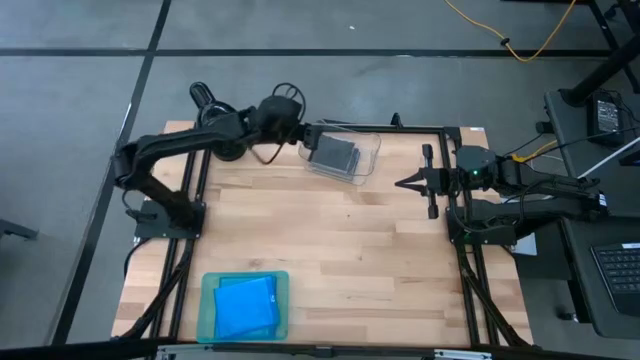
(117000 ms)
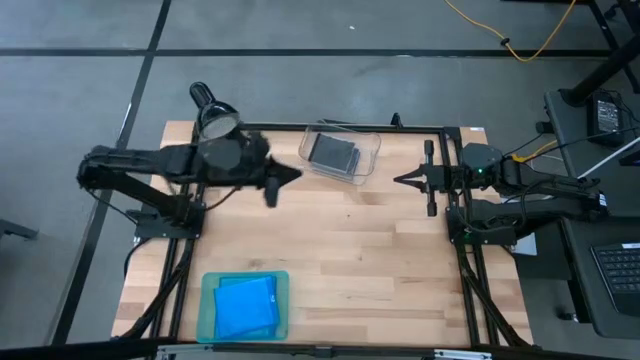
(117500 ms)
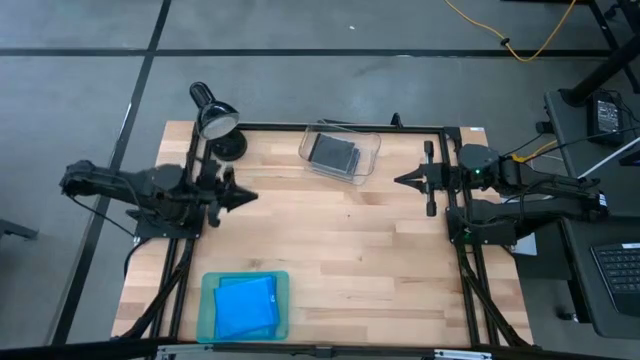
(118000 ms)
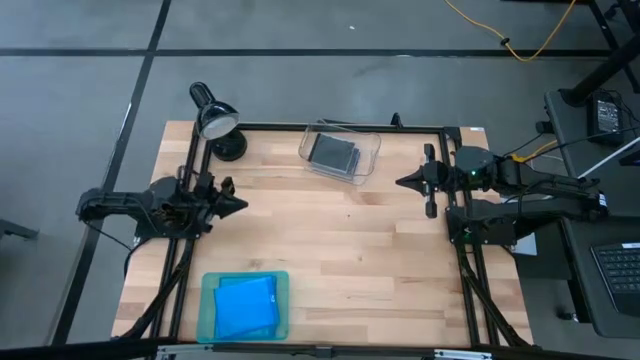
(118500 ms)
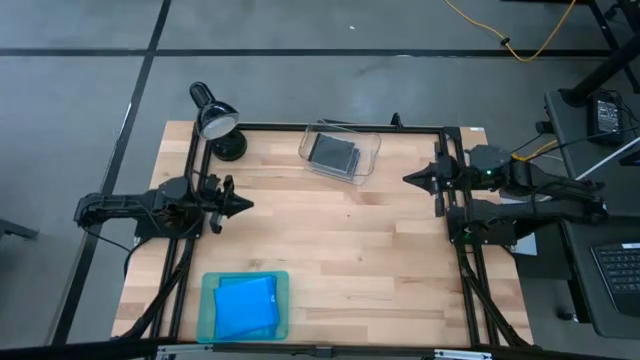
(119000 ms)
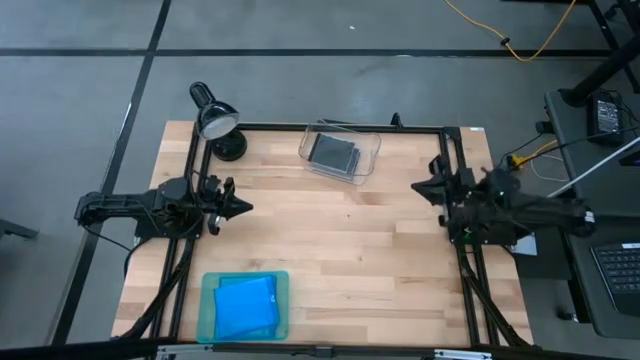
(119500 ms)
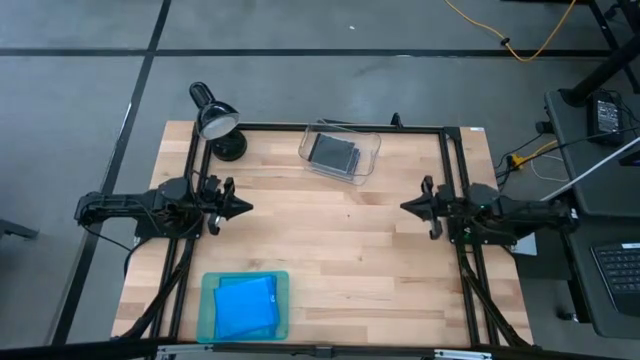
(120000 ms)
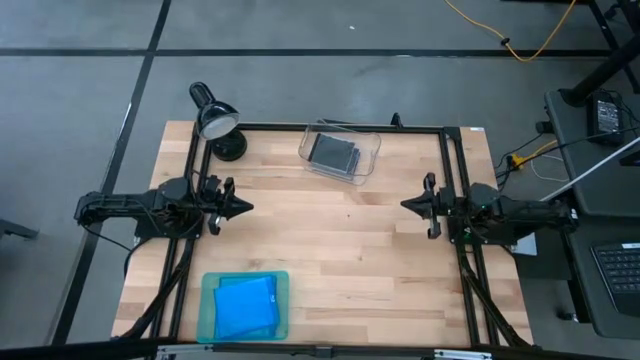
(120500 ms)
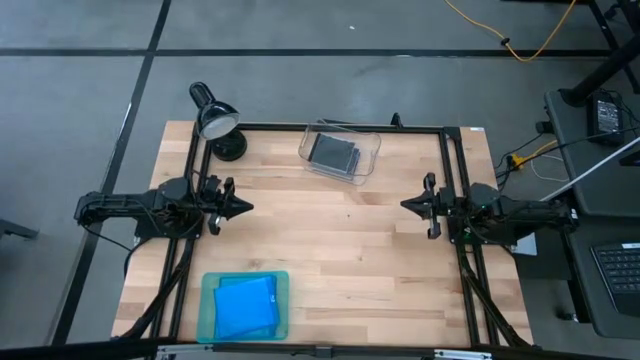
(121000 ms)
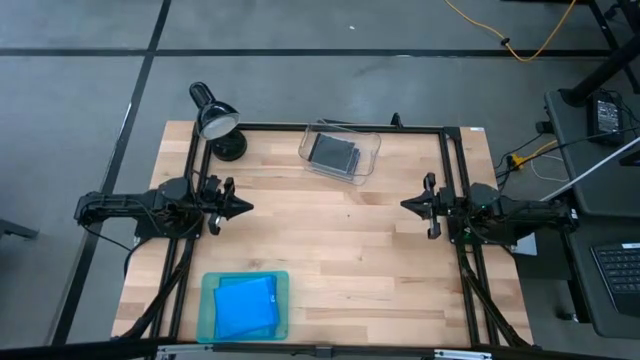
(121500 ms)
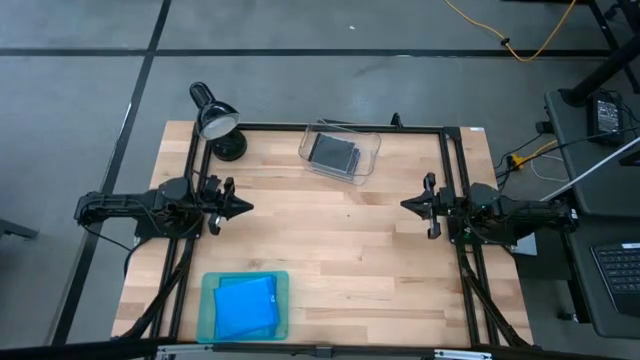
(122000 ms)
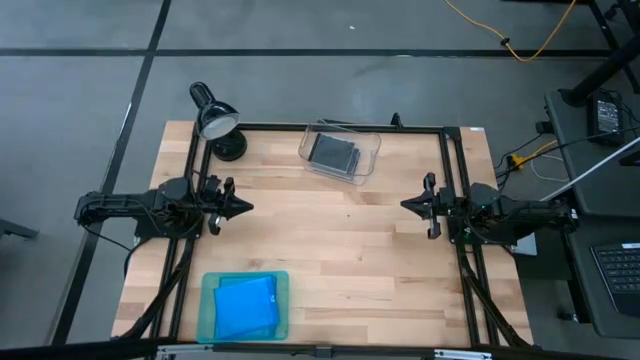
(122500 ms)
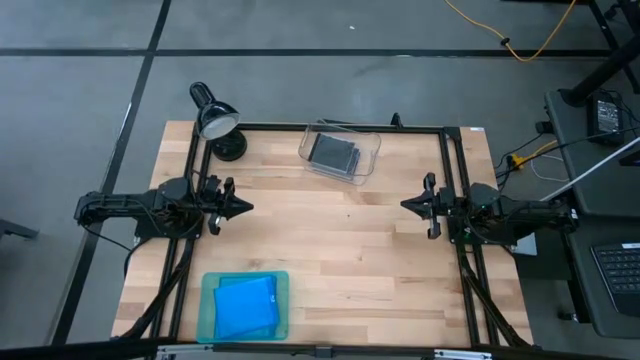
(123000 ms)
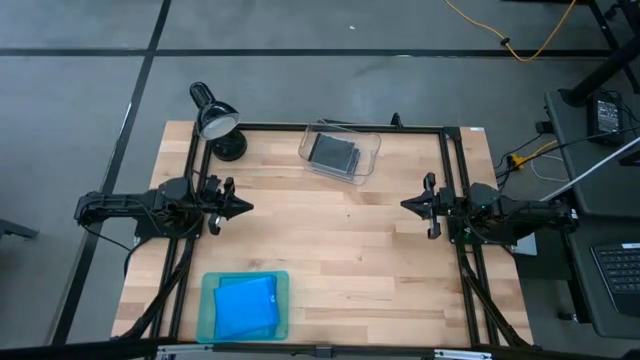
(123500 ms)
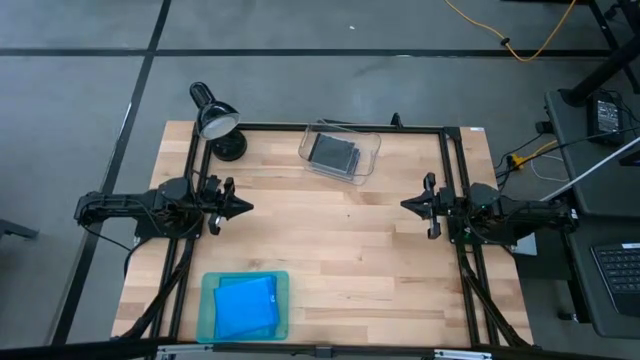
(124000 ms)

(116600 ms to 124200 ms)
Task: Pick & place jewel cases by type
Return to Home Position

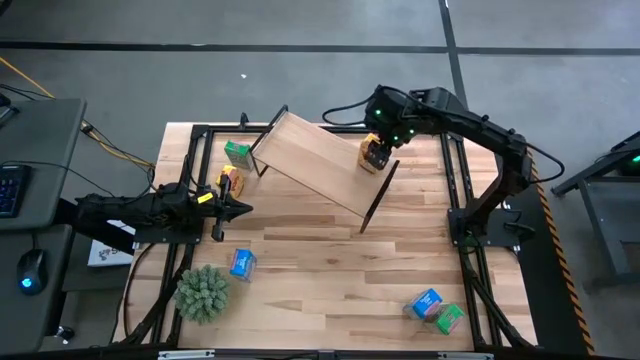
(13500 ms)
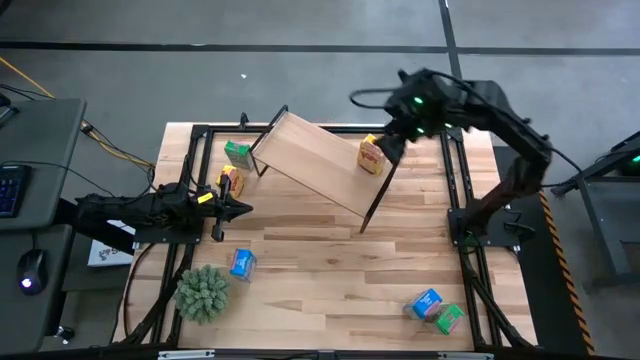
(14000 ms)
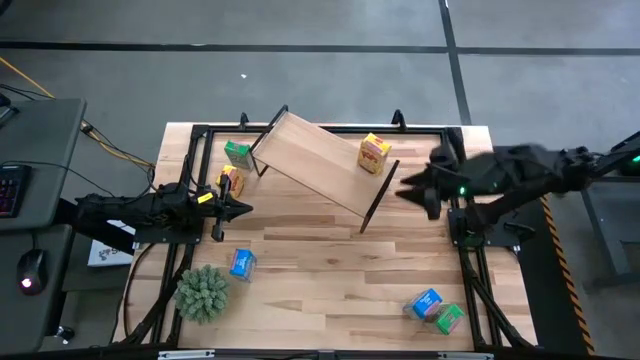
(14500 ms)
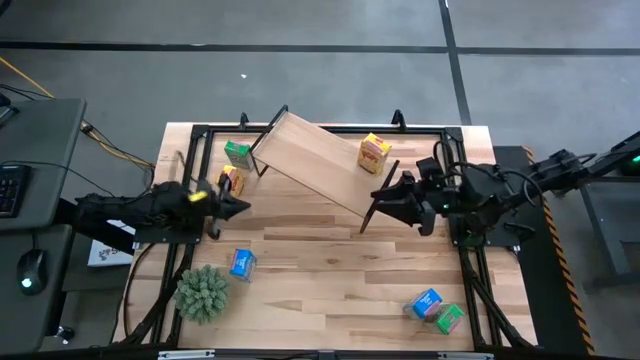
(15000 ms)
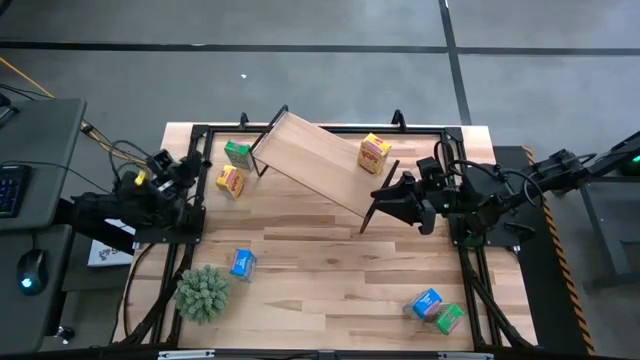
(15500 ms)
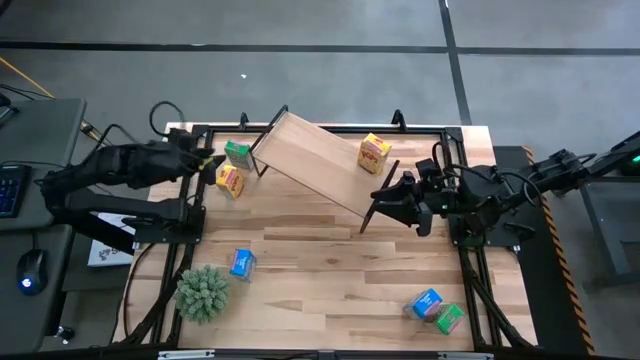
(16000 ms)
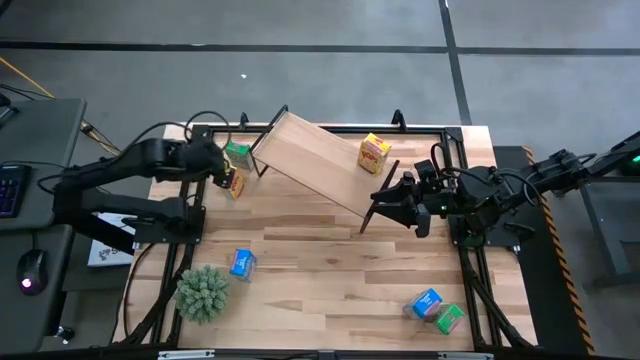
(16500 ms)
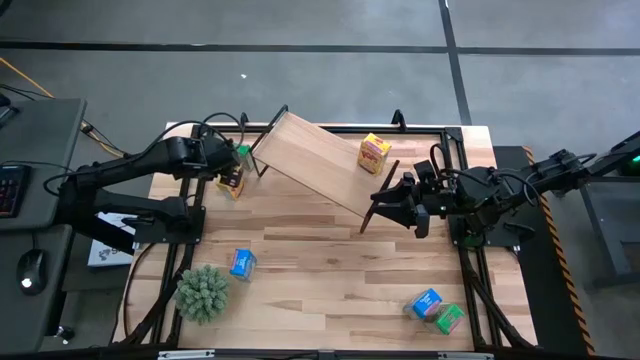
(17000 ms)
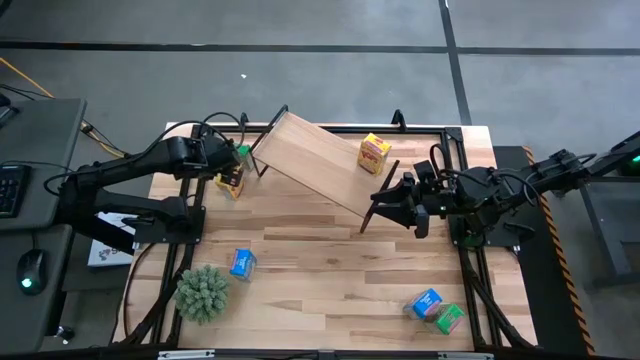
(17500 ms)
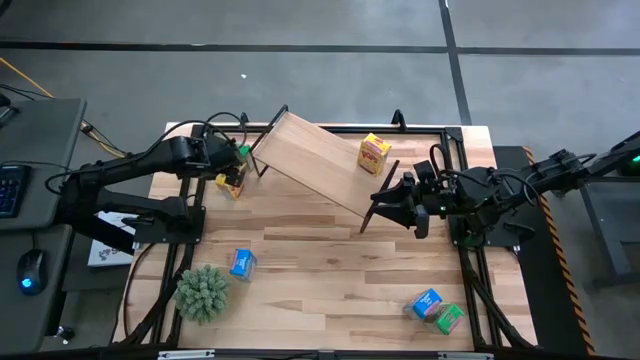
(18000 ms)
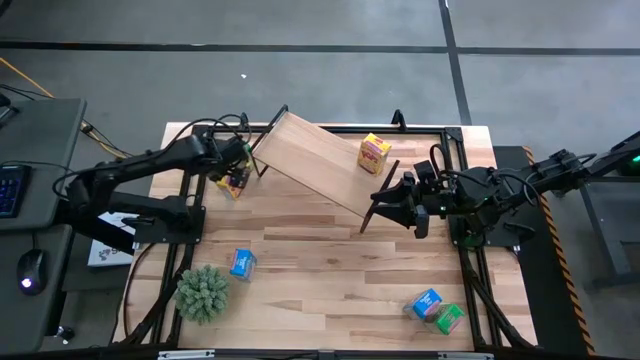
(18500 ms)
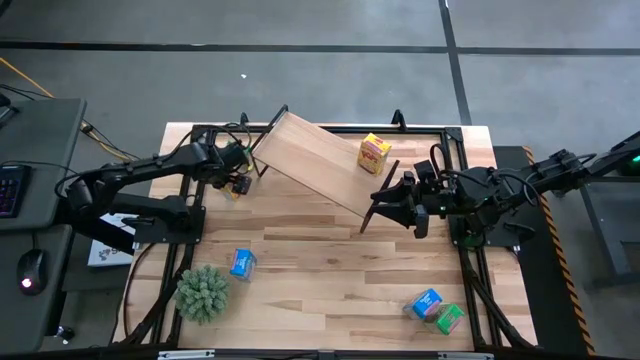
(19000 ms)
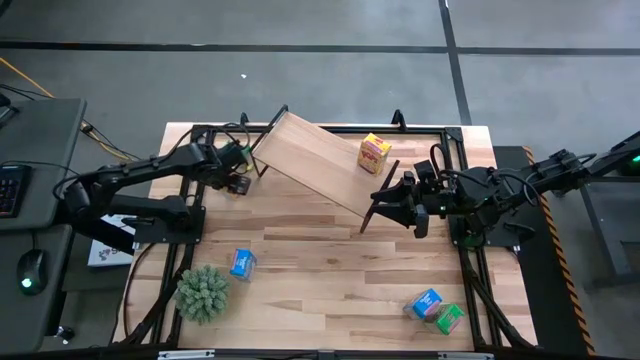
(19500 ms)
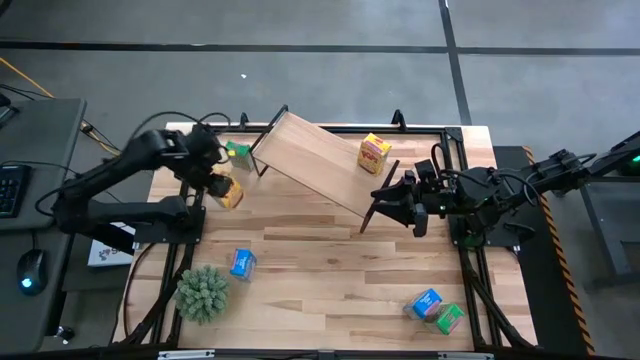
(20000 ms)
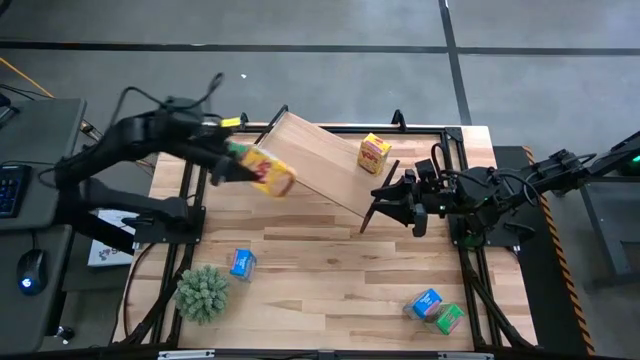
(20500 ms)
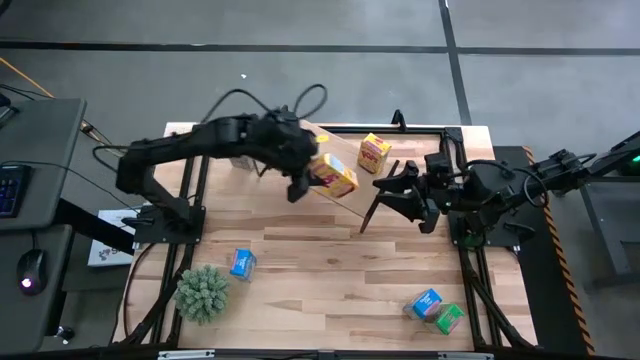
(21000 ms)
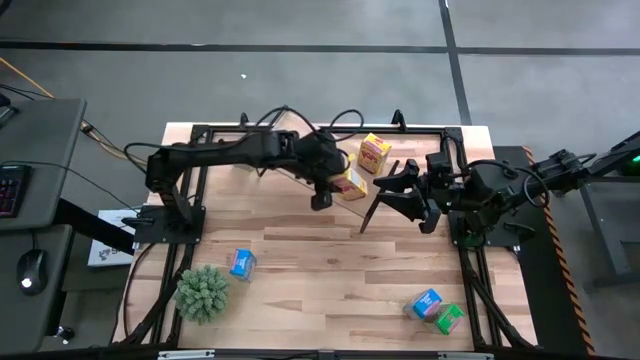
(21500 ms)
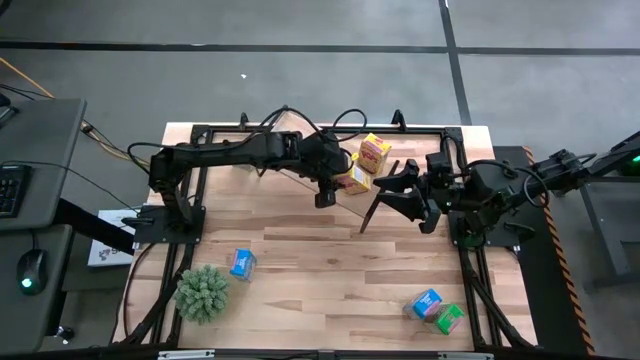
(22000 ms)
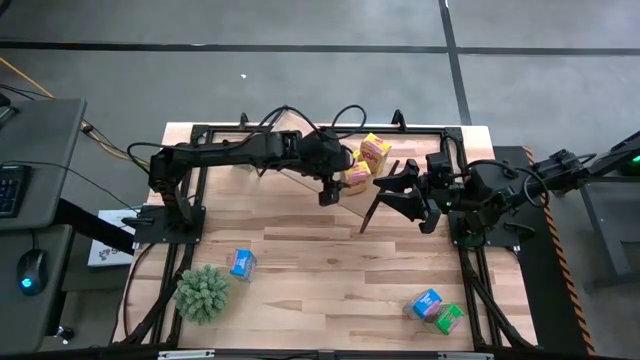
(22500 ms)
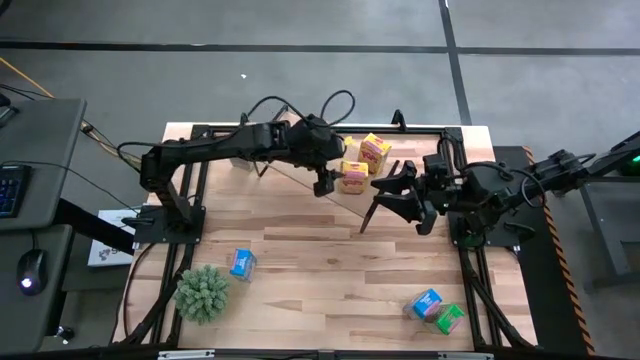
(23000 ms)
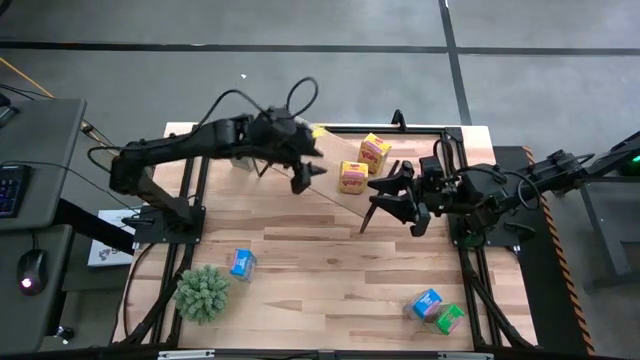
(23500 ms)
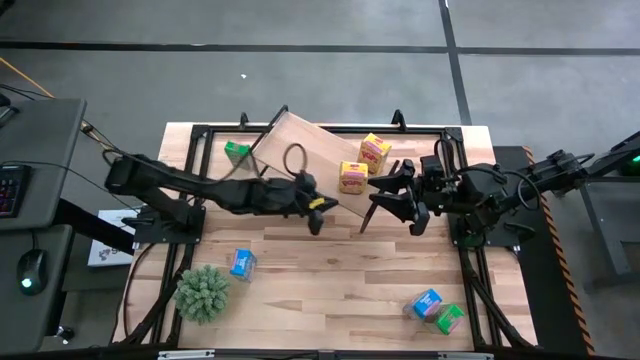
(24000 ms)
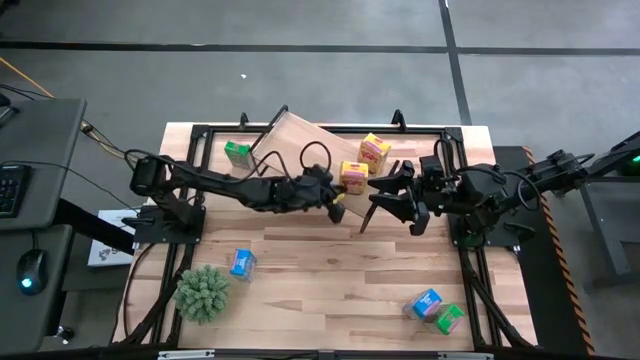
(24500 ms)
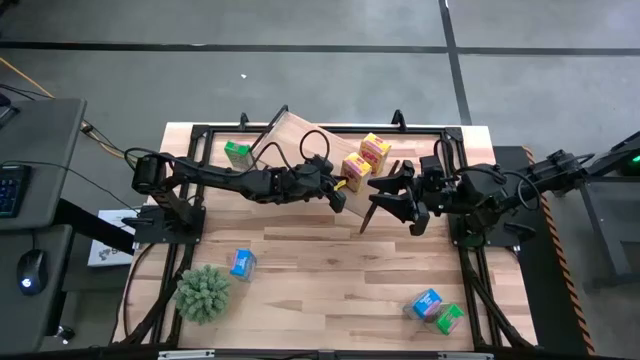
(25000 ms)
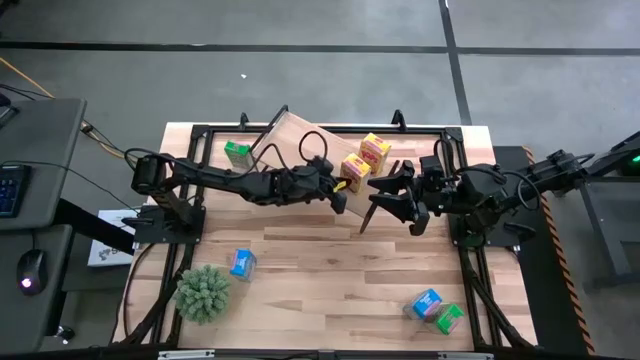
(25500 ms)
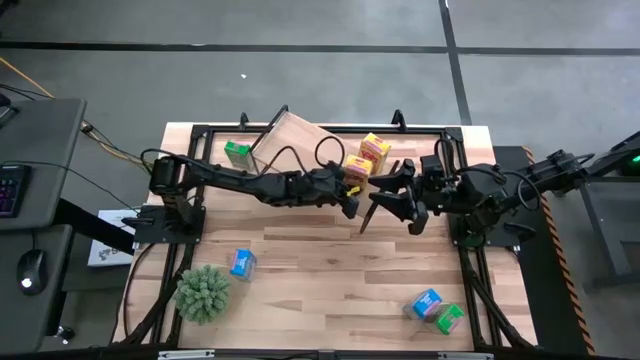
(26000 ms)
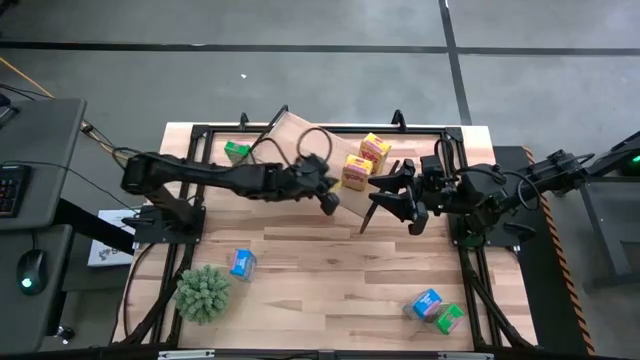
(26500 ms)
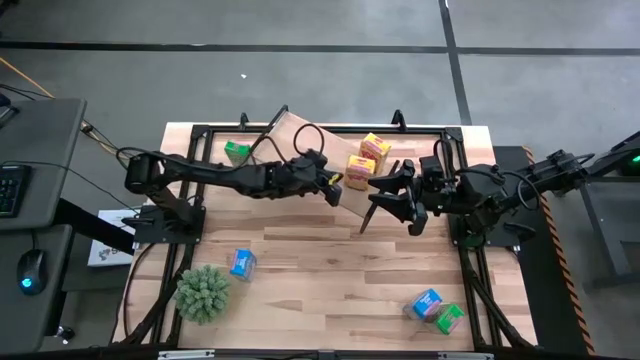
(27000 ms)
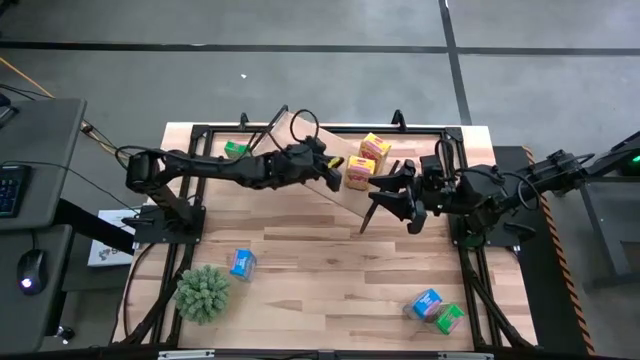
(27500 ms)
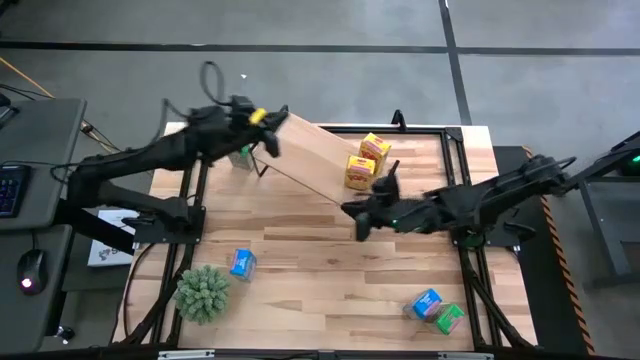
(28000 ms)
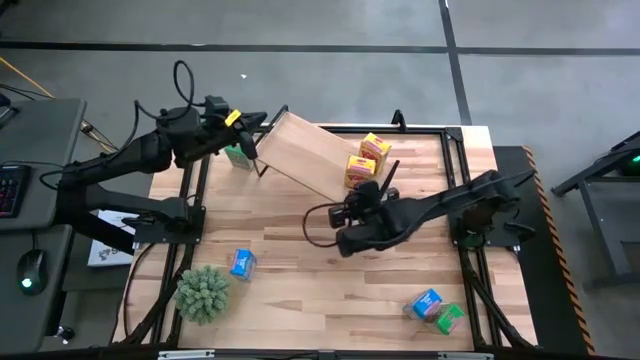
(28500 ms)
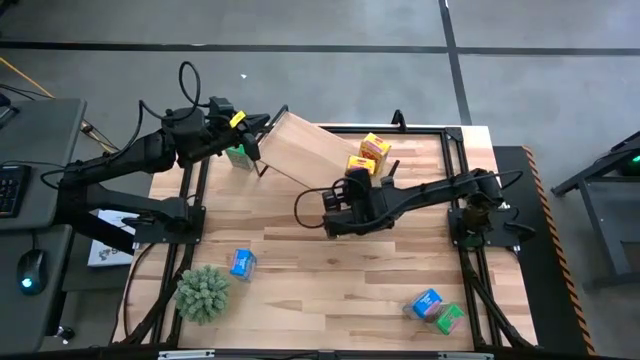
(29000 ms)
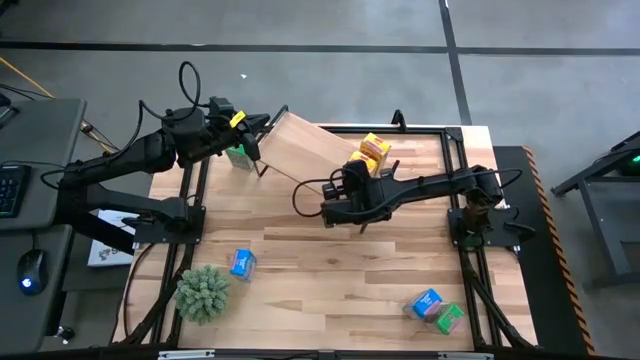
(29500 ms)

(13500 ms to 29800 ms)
Task: Stack cereal on shelf
Put the yellow cereal box on the shelf aligned with the other yellow cereal box
